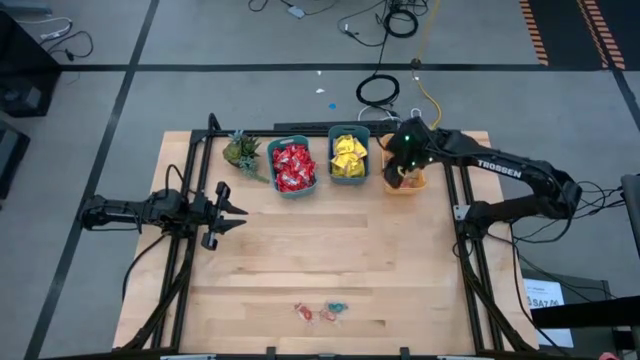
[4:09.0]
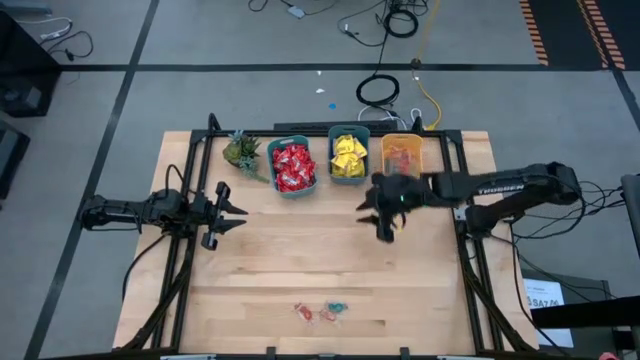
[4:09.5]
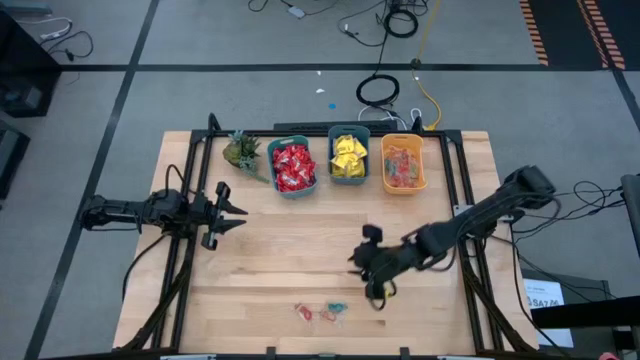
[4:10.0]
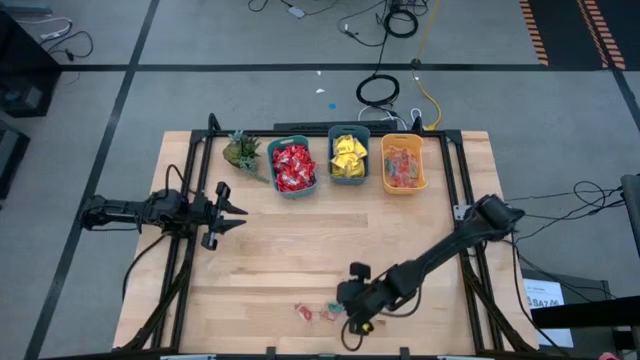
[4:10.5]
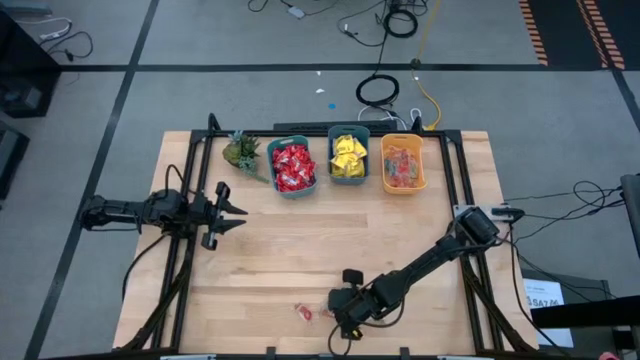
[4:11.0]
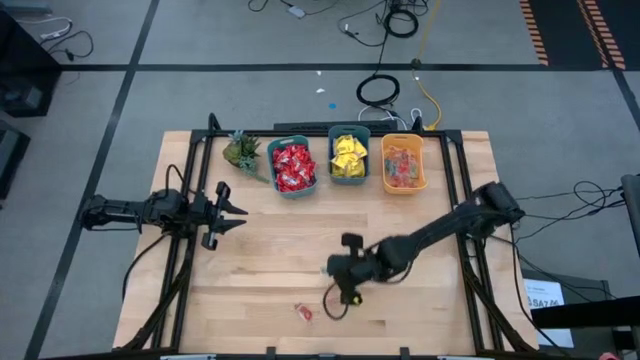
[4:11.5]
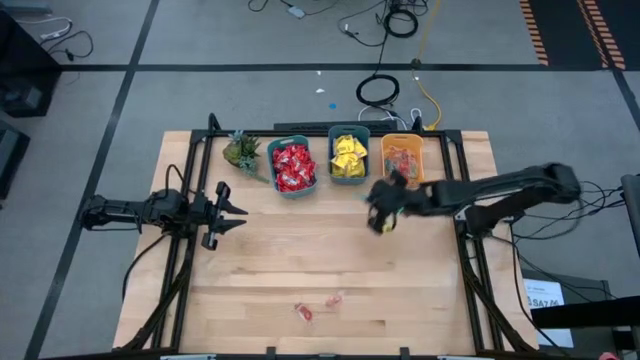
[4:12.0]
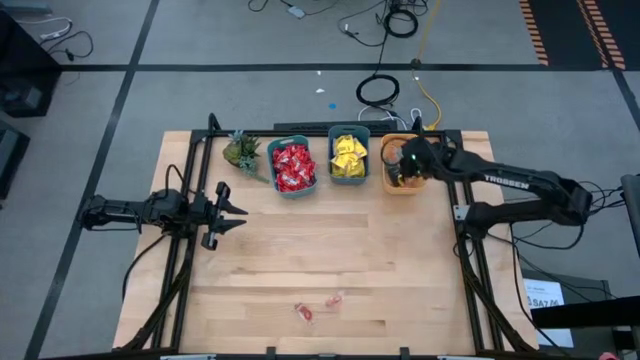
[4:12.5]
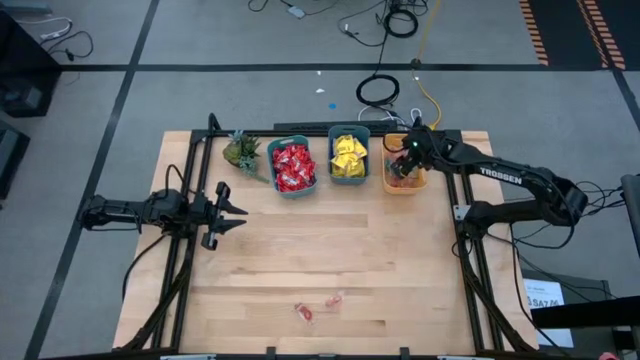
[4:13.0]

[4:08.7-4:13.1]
Task: Sort candy
Put the blue gummy candy into the yellow bin

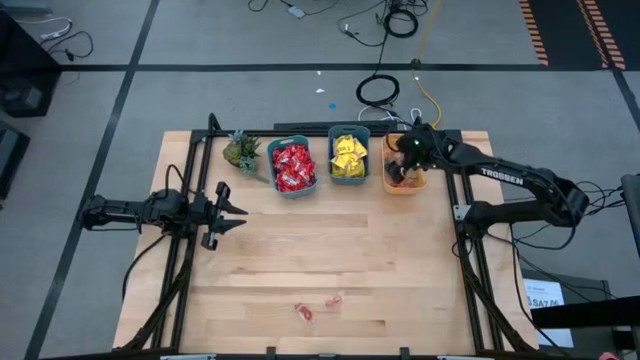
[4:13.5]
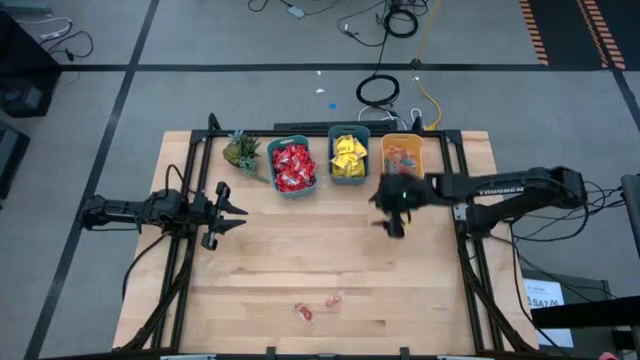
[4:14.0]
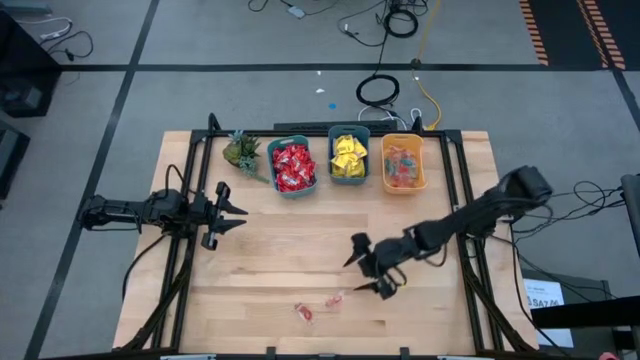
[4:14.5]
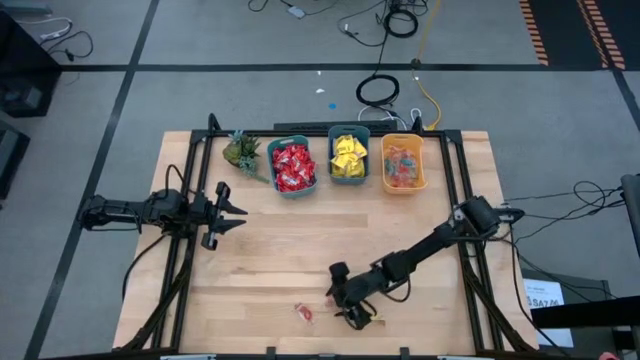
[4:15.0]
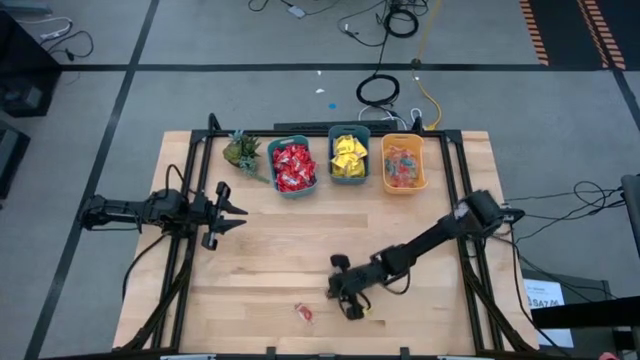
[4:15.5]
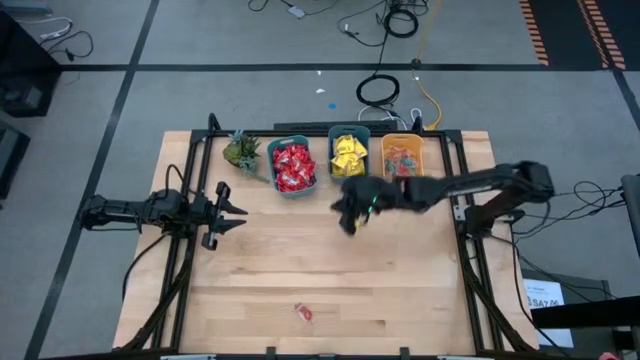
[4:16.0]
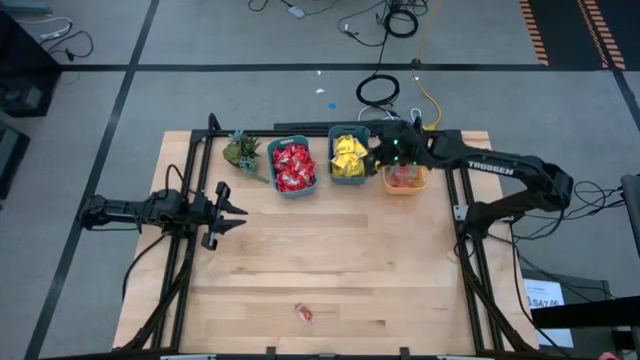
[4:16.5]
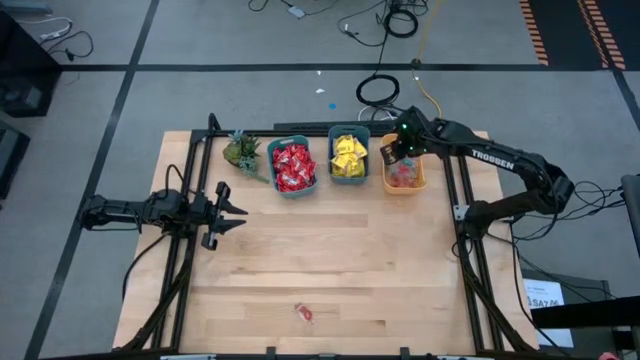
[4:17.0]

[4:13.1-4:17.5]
Put the orange gummy candy into the yellow bin

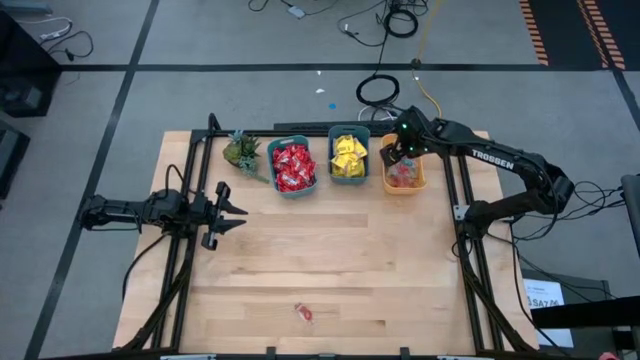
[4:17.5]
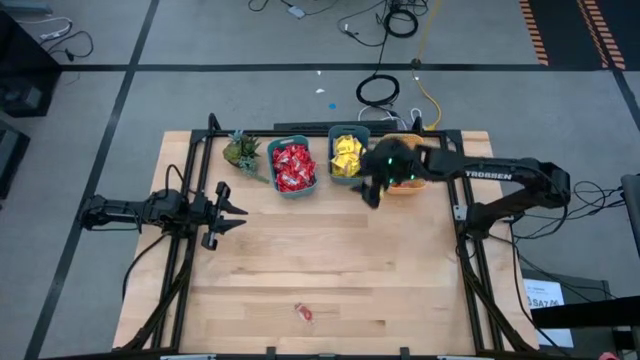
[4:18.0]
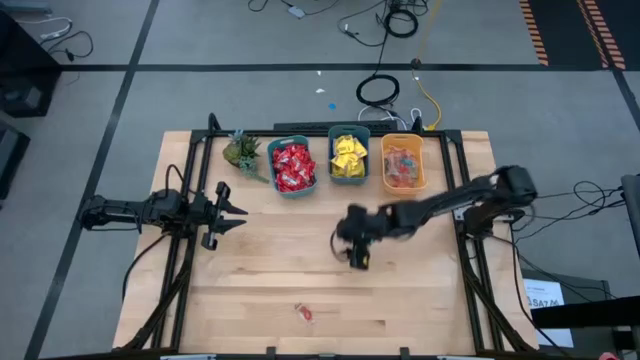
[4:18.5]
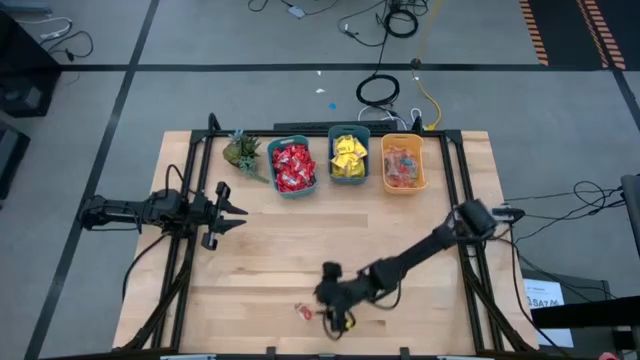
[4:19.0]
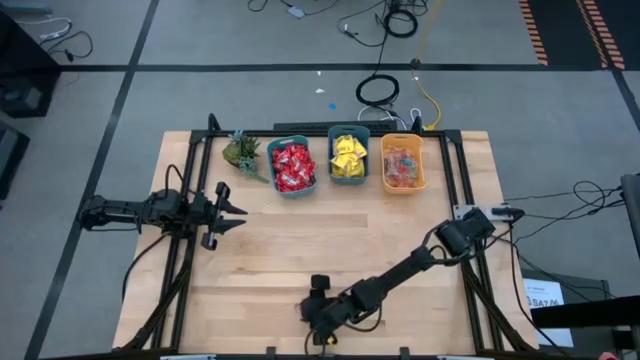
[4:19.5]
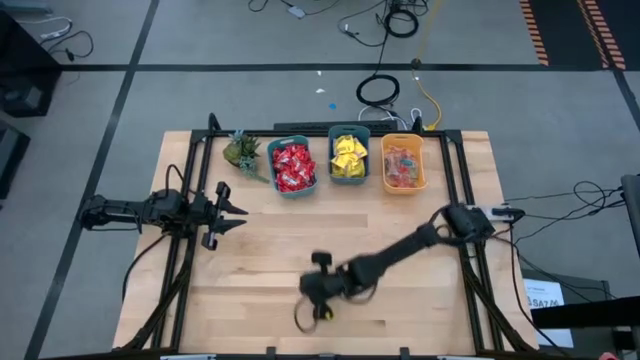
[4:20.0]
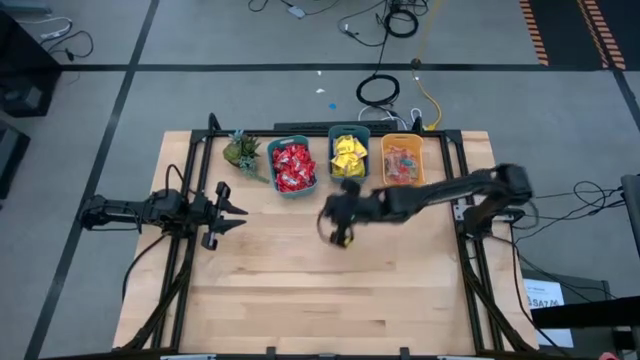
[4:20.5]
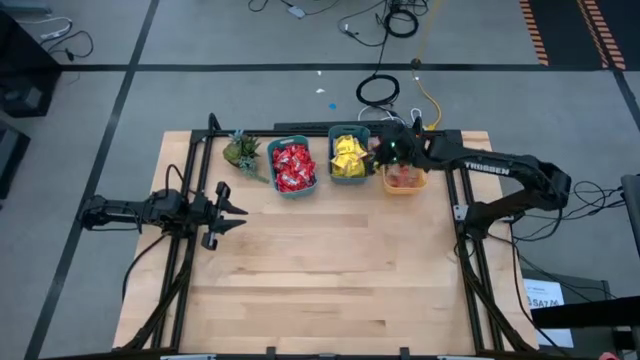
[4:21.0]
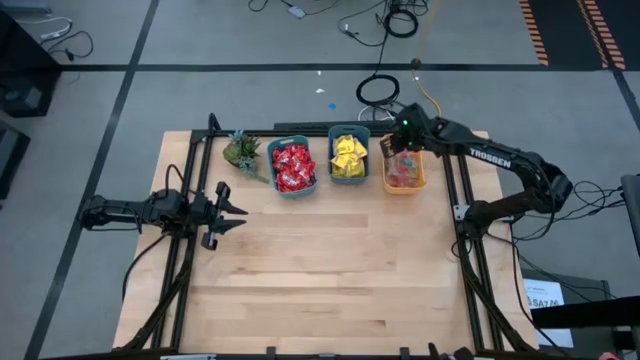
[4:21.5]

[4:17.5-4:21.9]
Put the red gummy candy into the yellow bin

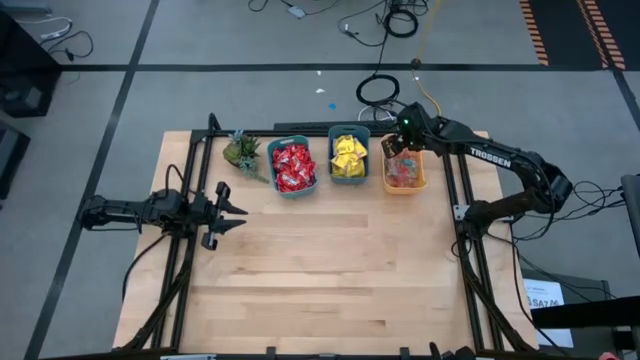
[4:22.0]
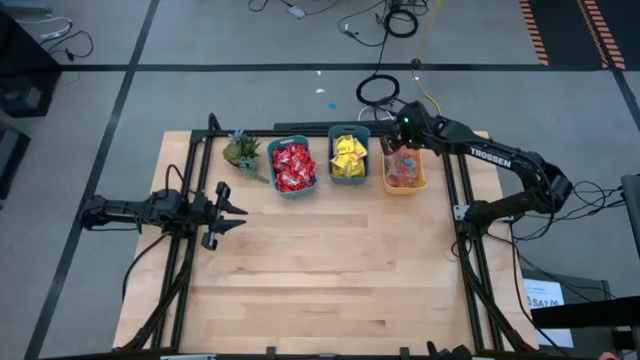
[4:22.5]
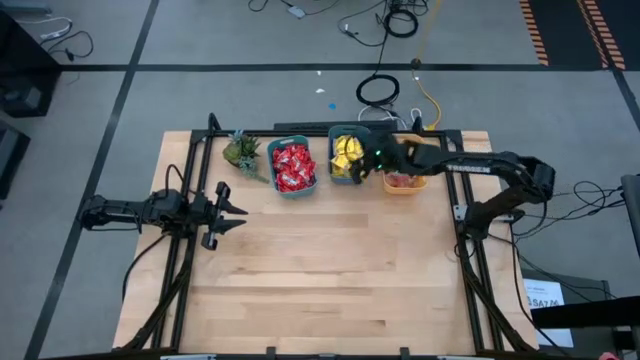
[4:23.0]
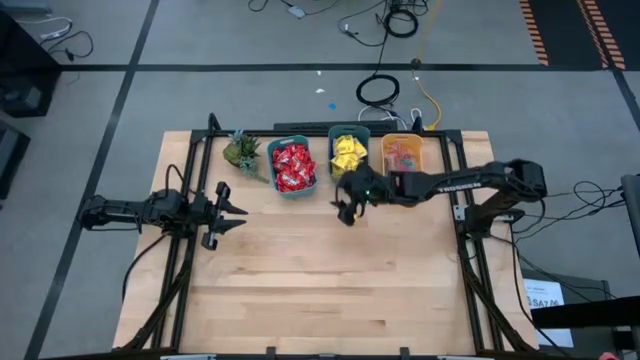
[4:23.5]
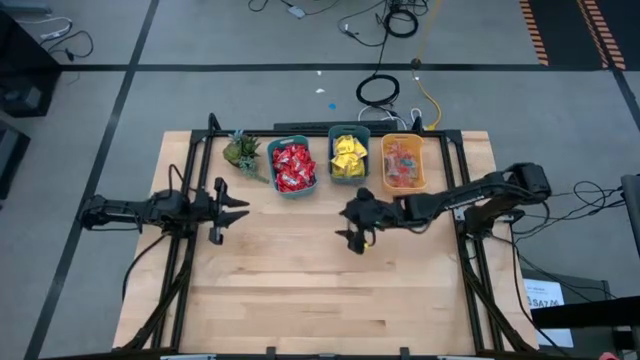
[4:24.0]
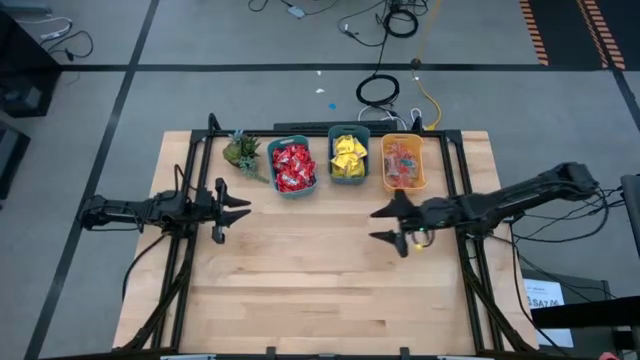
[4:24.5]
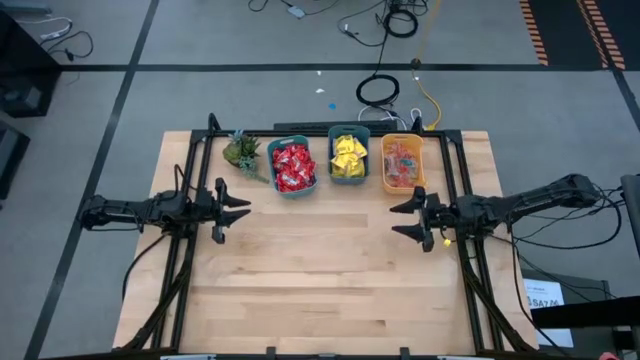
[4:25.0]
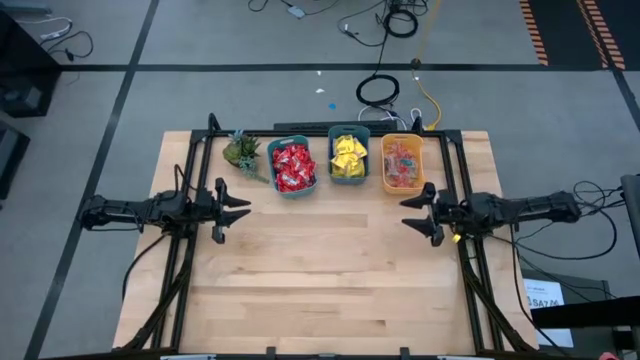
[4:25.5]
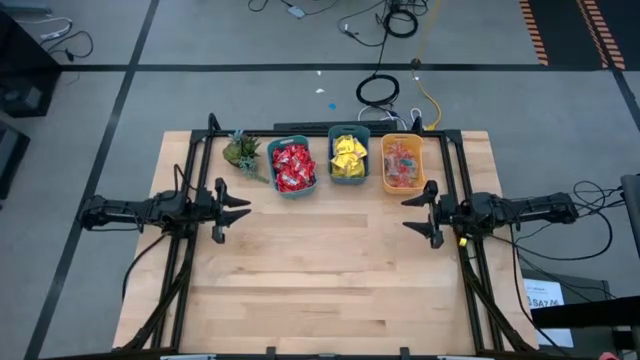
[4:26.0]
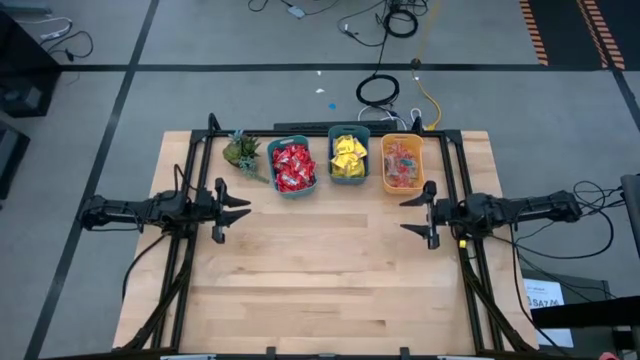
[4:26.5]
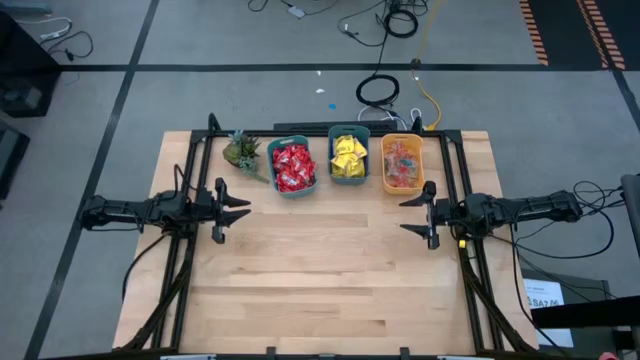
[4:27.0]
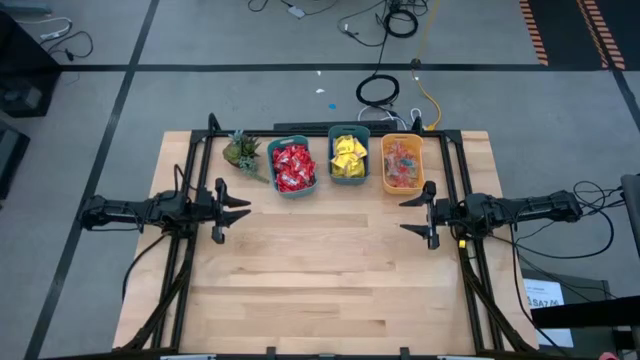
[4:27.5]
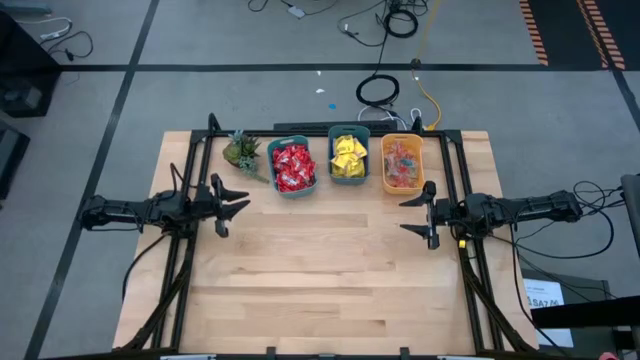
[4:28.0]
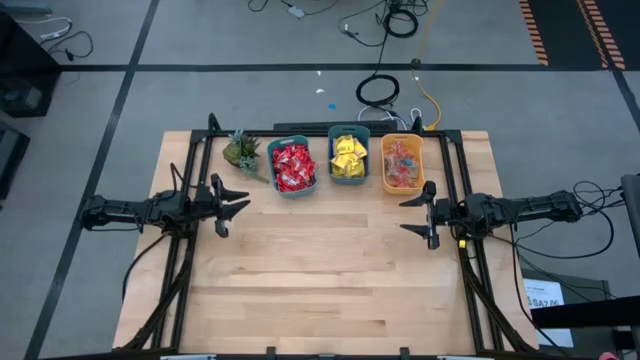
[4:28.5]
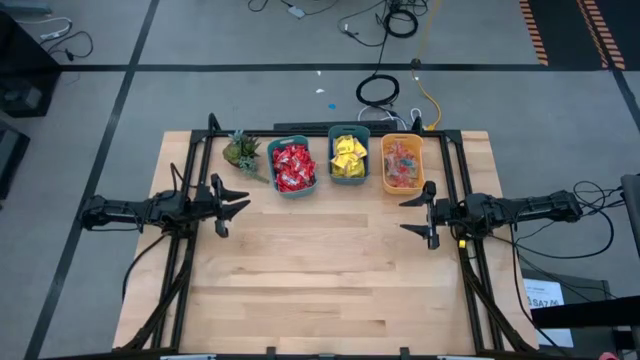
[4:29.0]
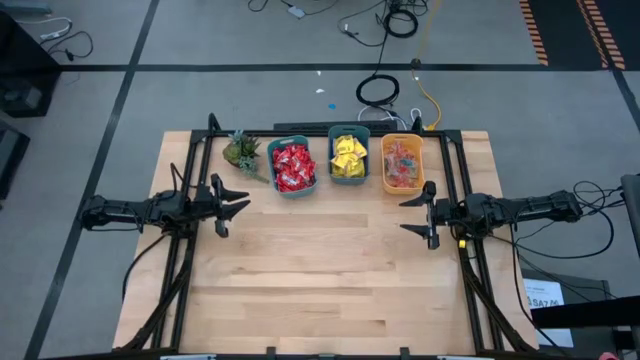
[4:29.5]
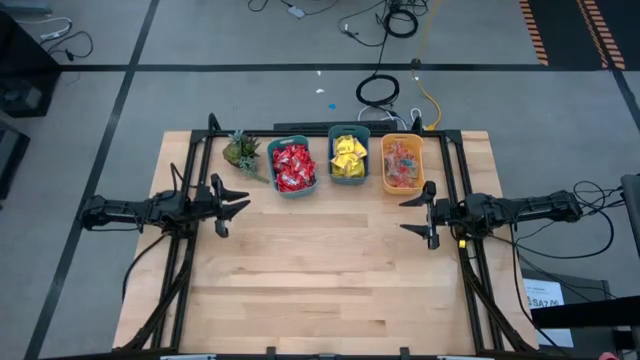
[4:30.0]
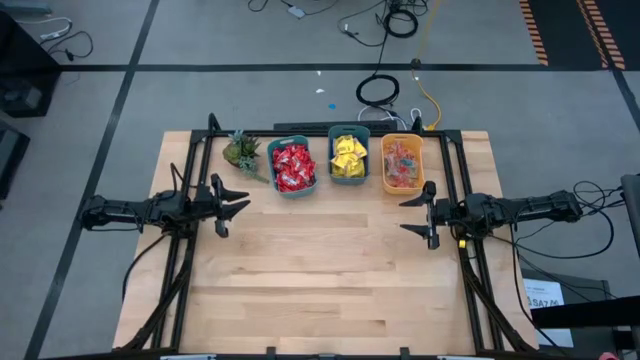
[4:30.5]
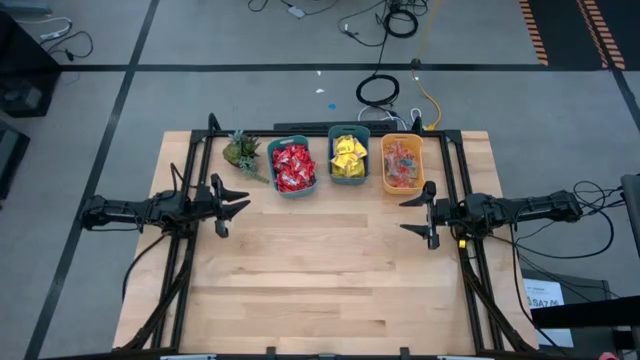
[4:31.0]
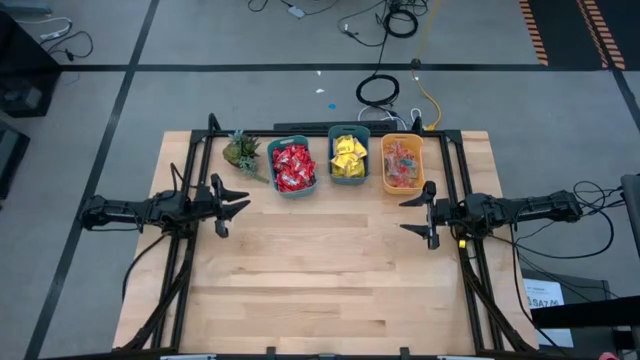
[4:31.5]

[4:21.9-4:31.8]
Return to Home Position
